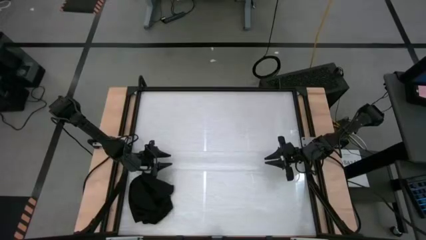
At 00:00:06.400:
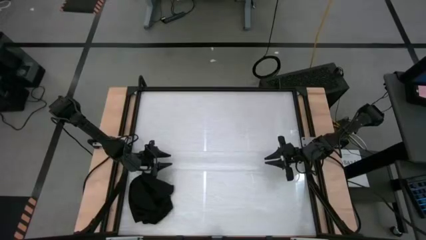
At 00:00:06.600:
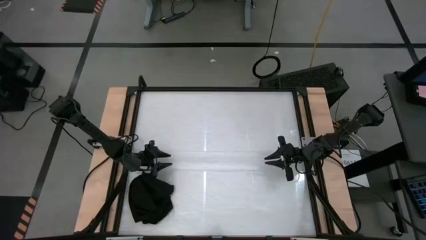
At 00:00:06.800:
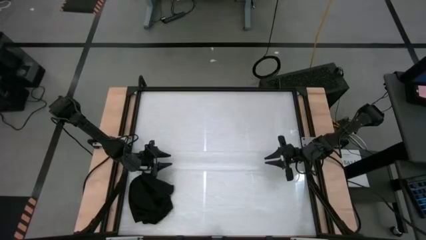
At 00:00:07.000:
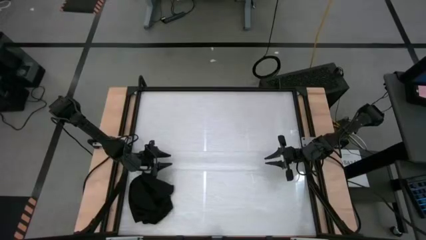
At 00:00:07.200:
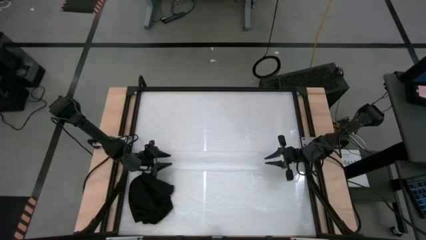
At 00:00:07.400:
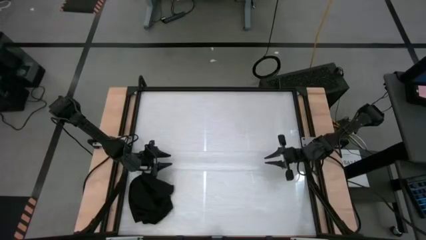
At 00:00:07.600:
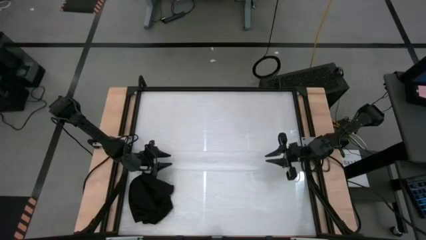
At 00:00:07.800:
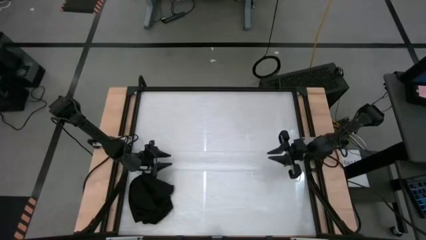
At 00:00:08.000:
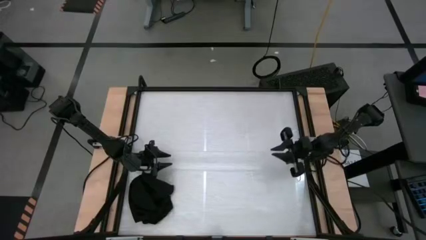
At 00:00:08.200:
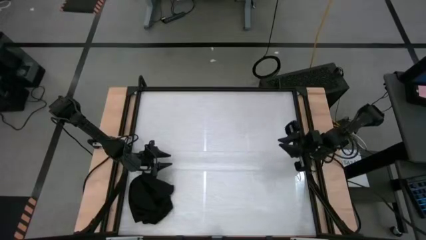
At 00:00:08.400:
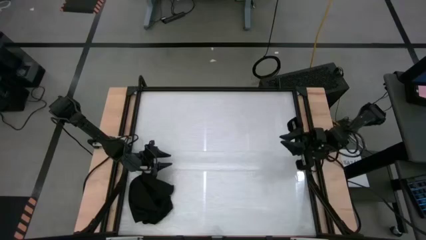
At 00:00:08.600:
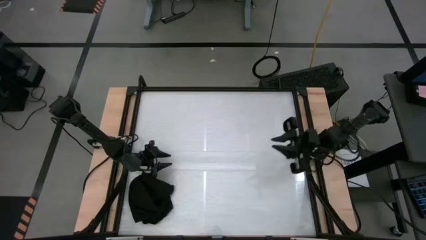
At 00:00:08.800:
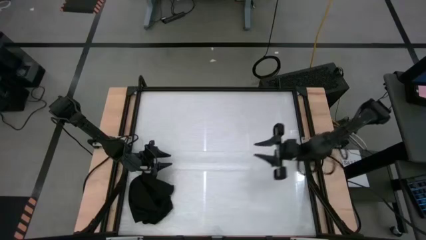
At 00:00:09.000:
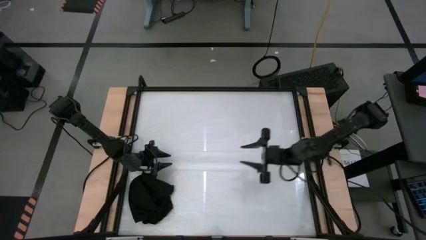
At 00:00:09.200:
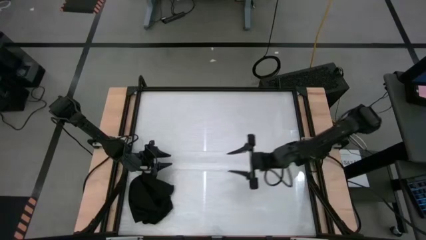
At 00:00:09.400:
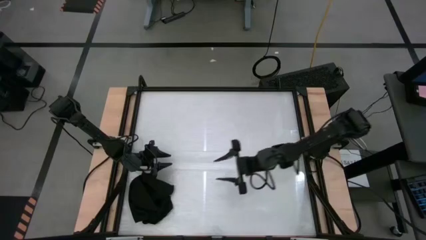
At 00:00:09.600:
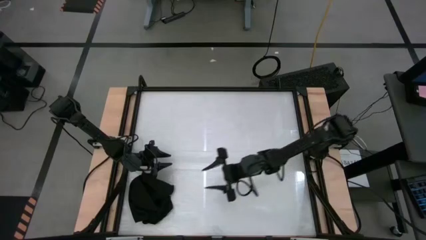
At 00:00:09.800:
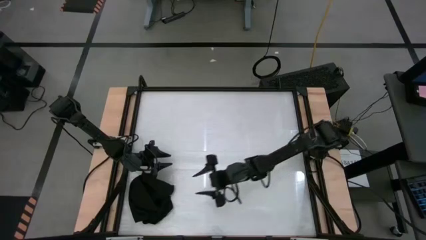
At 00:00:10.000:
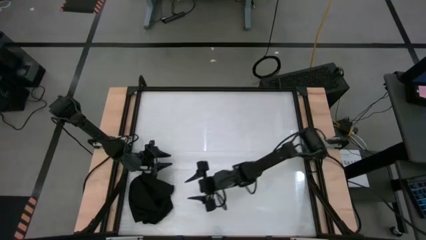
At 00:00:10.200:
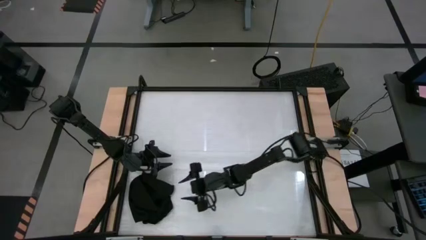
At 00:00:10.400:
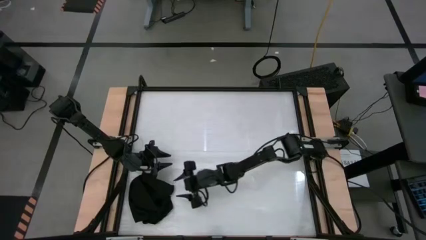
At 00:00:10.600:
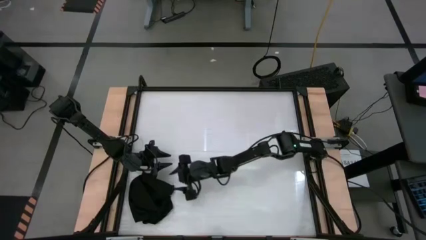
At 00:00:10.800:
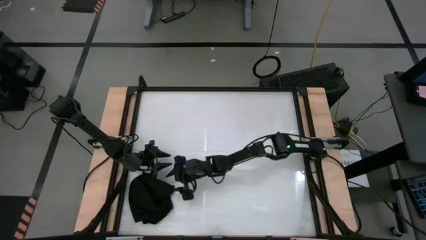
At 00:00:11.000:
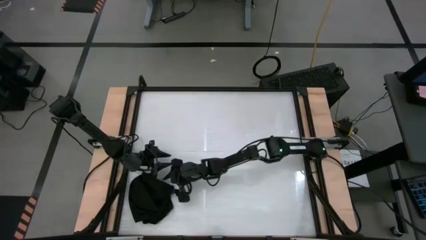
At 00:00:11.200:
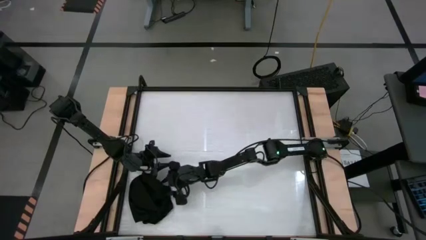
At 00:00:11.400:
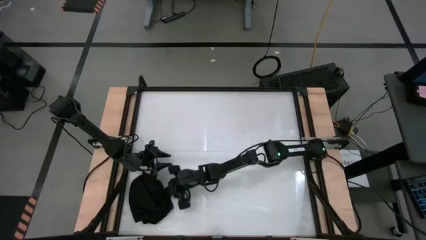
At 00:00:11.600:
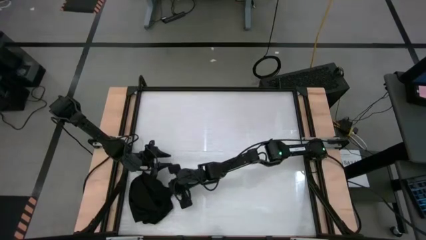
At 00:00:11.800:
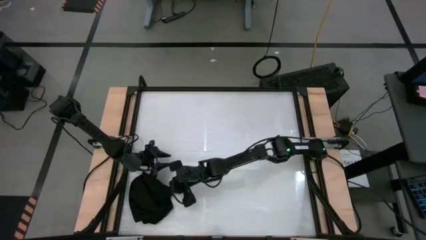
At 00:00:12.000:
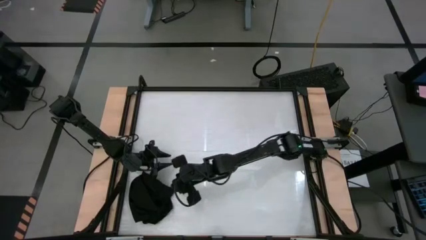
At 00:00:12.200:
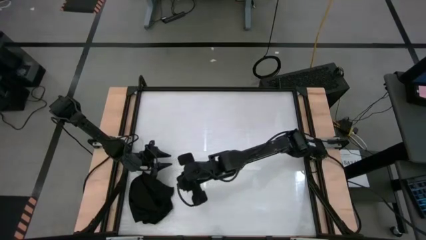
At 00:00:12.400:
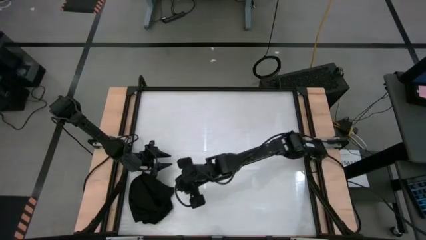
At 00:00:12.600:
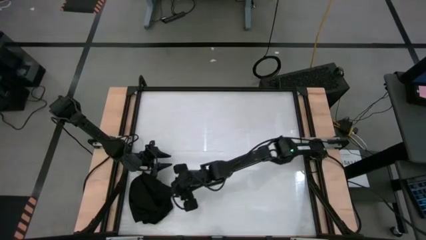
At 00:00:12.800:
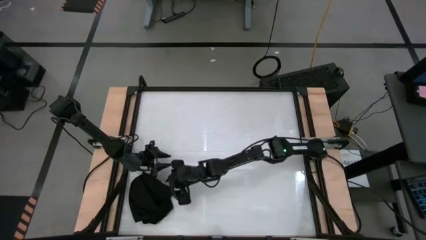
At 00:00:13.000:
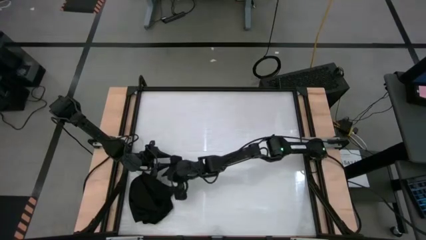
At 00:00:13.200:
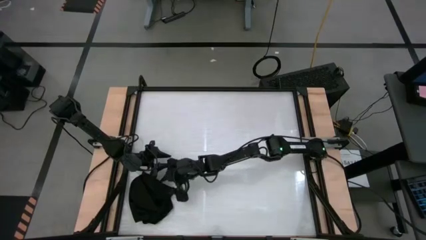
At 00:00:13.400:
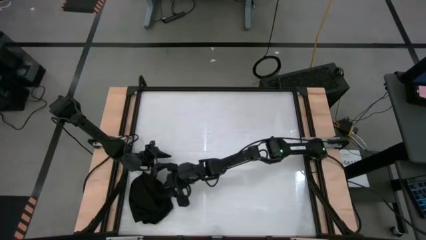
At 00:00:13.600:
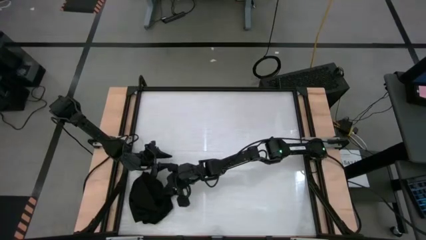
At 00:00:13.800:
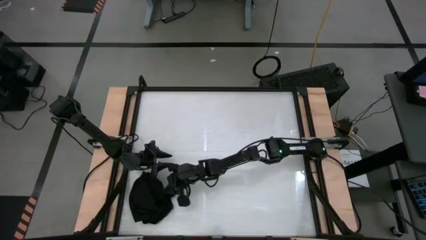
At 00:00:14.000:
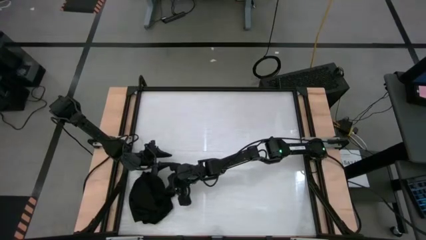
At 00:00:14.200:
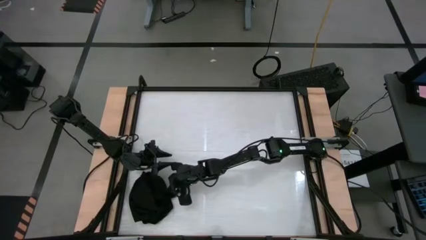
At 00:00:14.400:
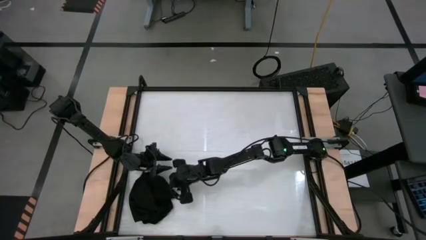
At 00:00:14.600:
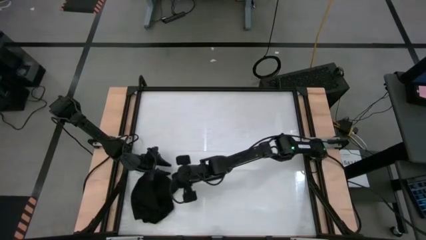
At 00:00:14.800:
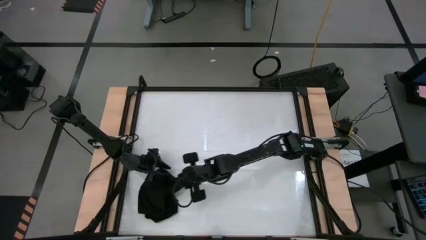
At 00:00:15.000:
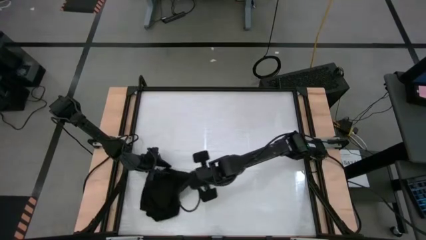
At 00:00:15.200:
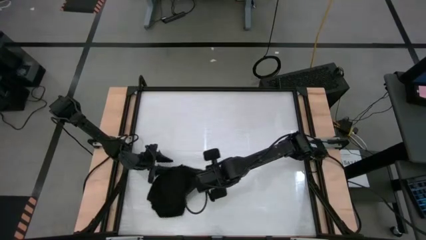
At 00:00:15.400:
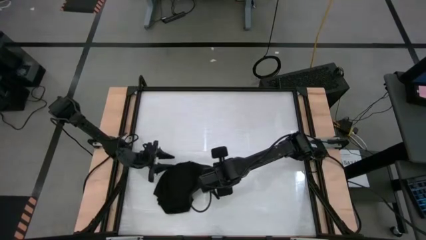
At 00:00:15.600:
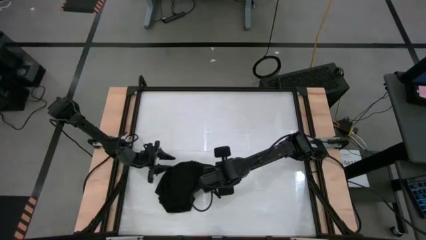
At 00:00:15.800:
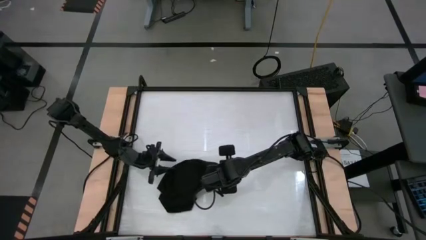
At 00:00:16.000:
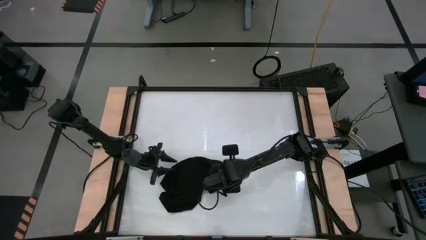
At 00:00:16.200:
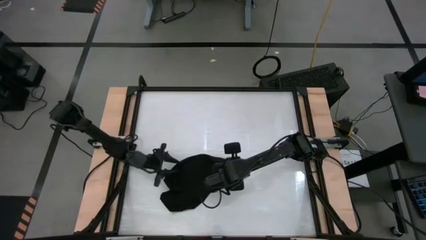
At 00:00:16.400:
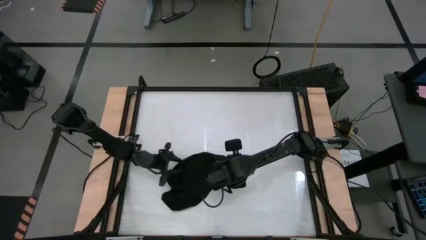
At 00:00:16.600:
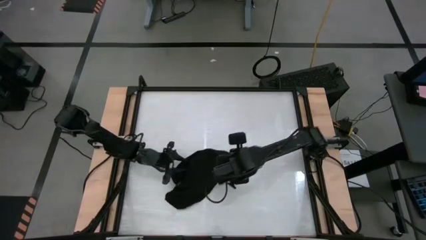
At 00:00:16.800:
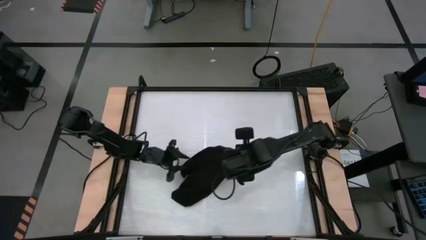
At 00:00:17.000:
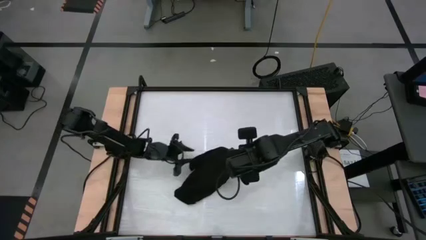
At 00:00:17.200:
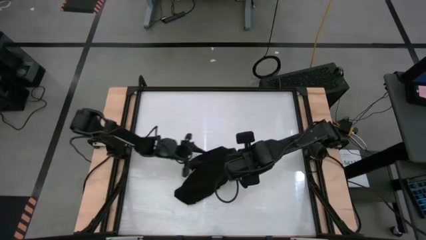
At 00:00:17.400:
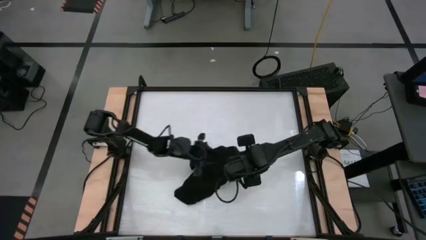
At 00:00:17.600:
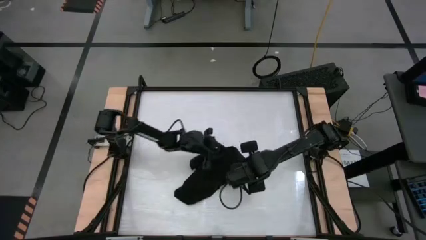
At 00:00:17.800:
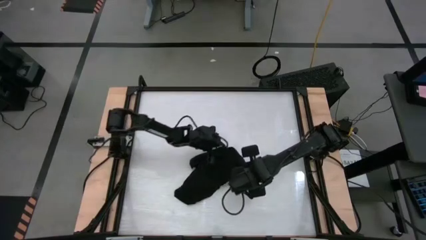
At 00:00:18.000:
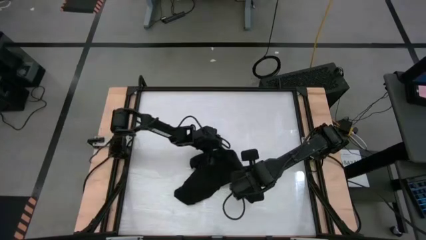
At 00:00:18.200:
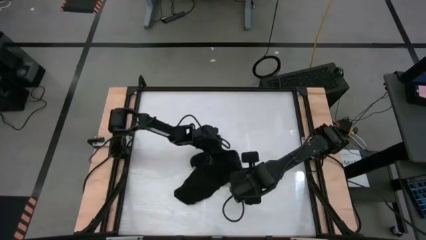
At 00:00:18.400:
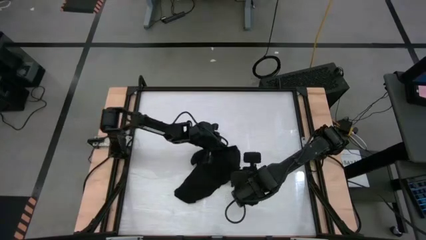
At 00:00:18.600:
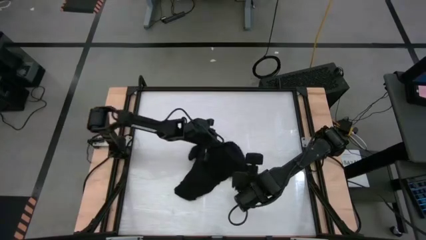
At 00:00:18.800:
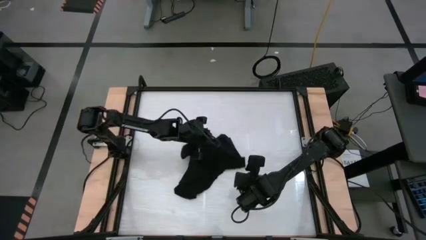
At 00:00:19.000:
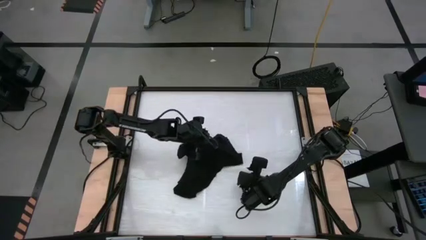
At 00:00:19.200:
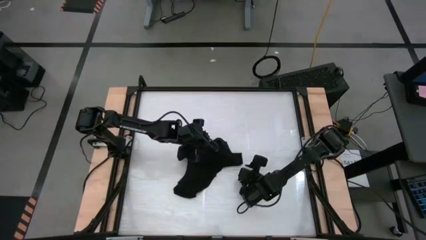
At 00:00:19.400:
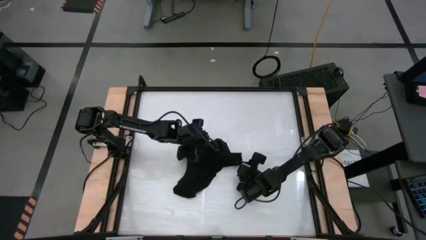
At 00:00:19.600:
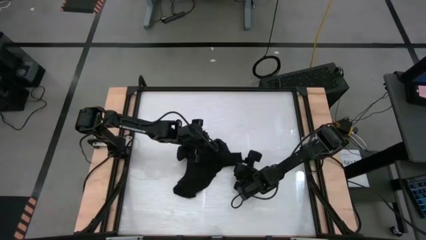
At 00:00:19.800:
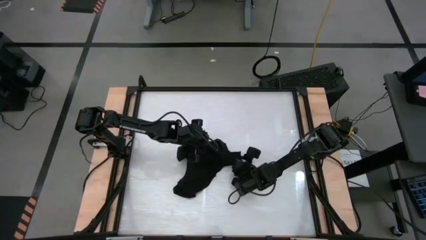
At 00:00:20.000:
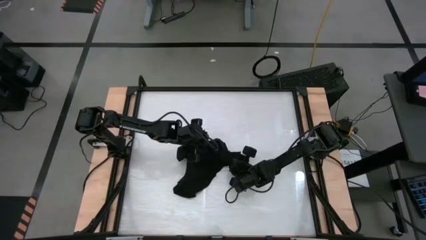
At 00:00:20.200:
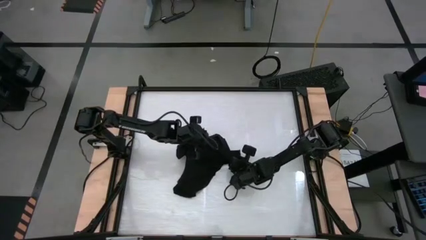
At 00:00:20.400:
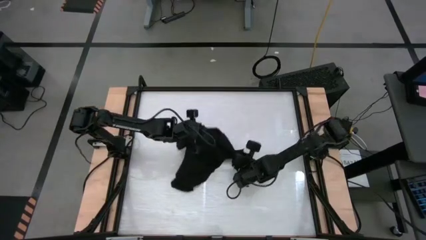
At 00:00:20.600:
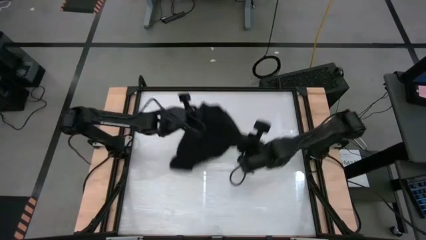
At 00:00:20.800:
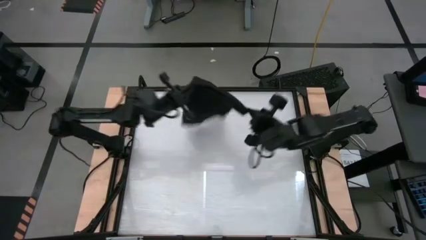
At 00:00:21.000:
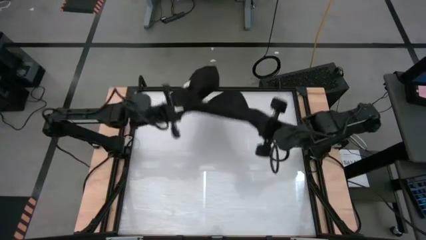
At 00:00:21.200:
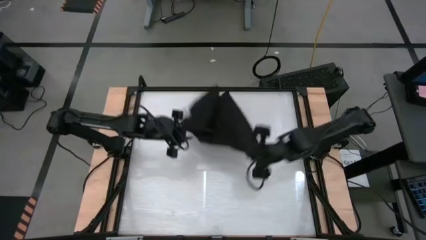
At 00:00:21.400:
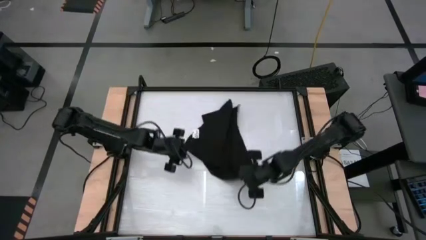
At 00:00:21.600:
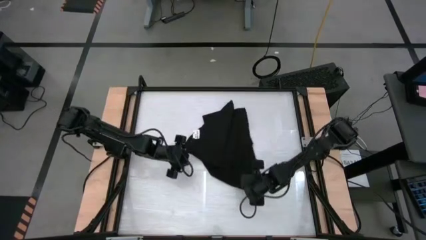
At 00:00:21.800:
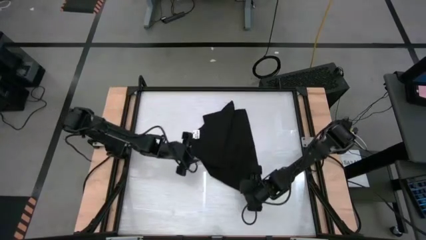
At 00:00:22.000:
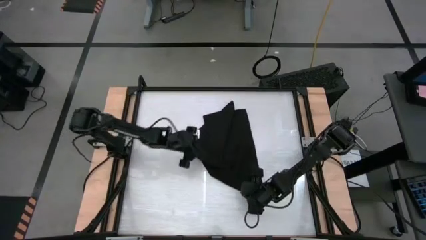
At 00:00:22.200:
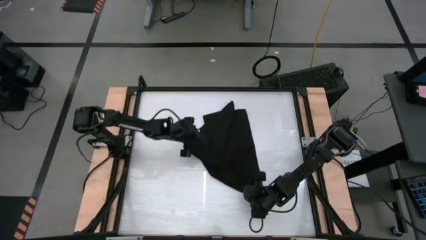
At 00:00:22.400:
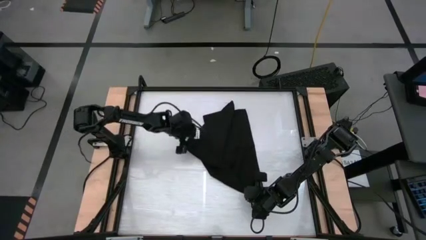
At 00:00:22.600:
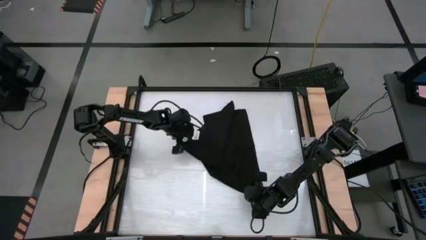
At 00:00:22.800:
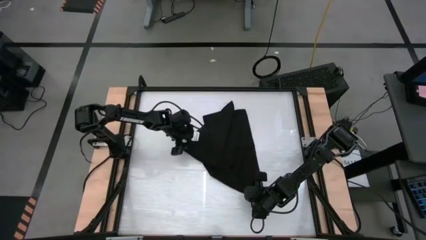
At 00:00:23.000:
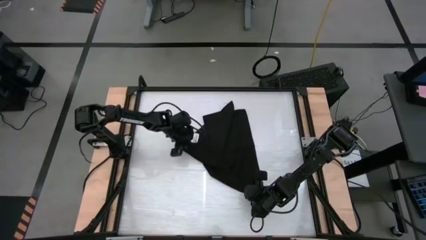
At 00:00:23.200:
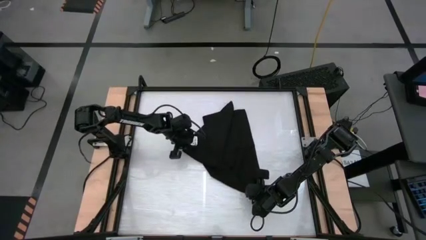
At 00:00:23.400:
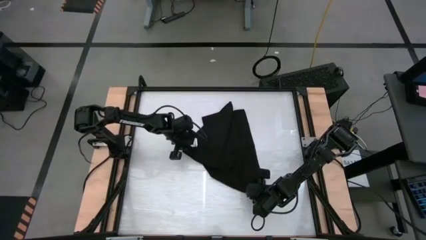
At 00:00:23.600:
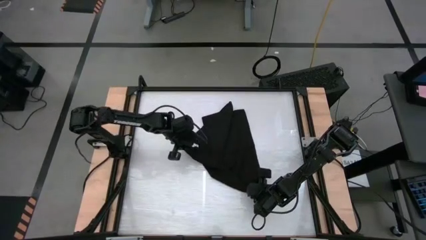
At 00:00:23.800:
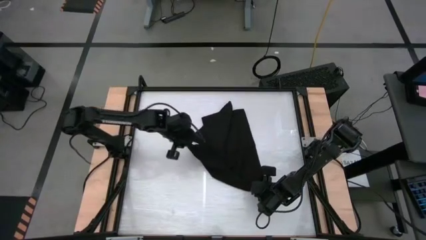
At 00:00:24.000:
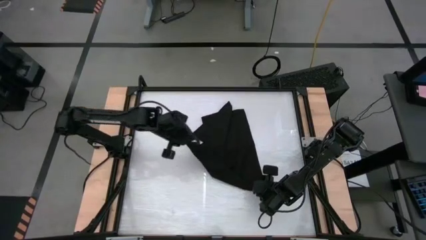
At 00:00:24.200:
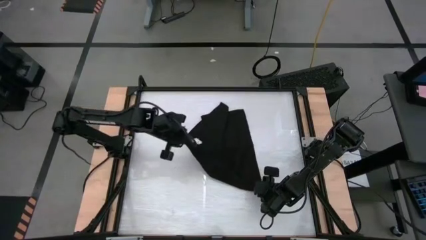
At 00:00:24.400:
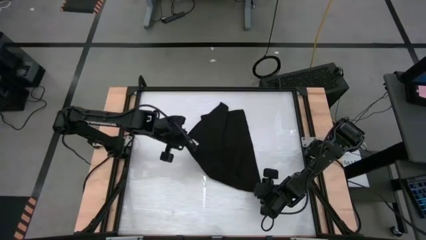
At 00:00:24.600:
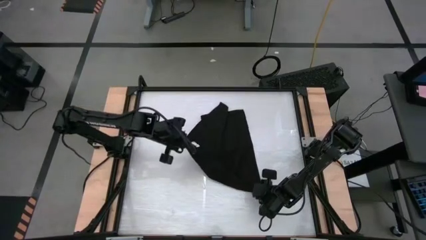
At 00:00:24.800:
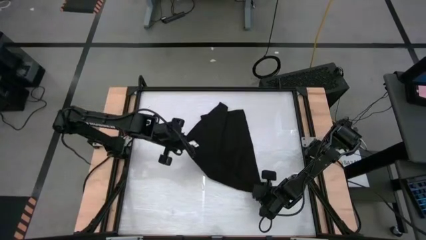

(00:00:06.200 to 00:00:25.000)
Task: Roll napkin
Roll the black napkin
